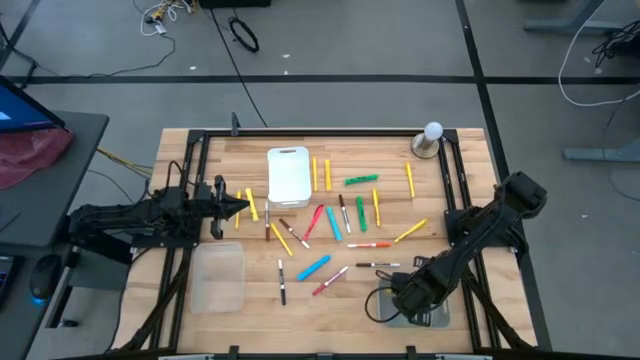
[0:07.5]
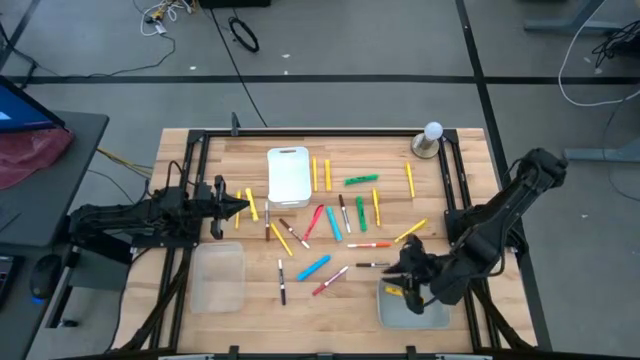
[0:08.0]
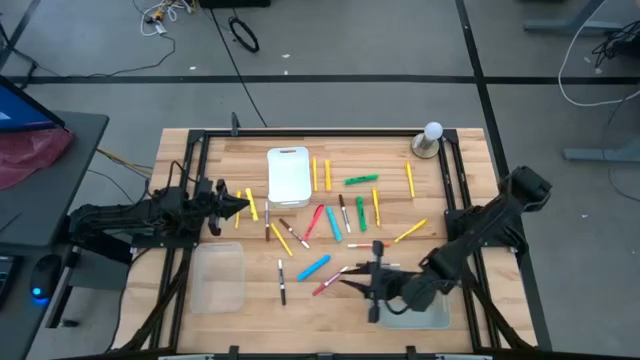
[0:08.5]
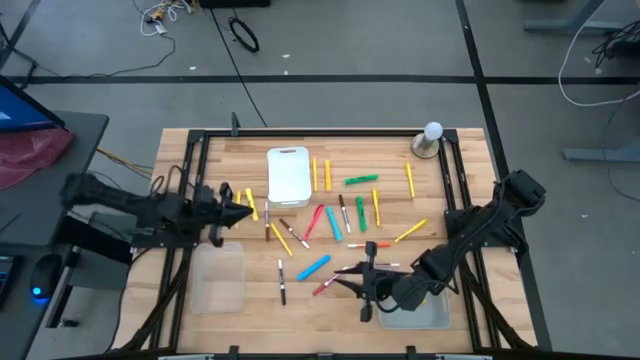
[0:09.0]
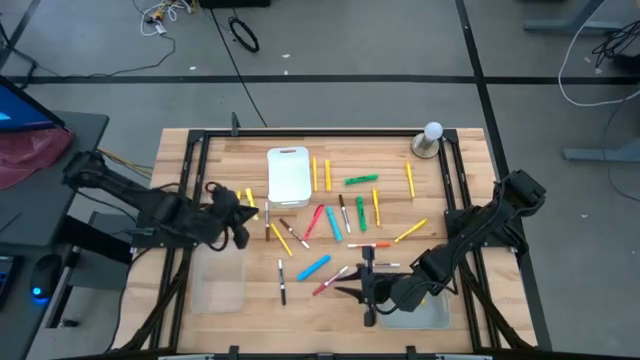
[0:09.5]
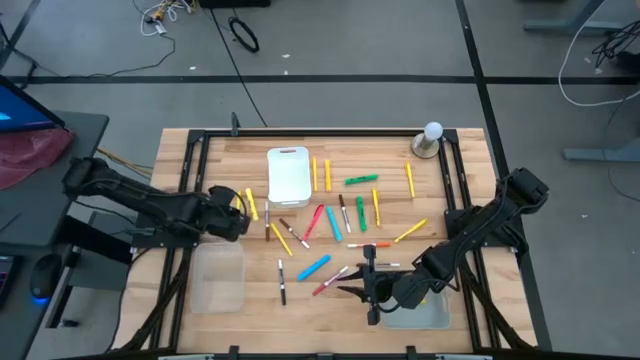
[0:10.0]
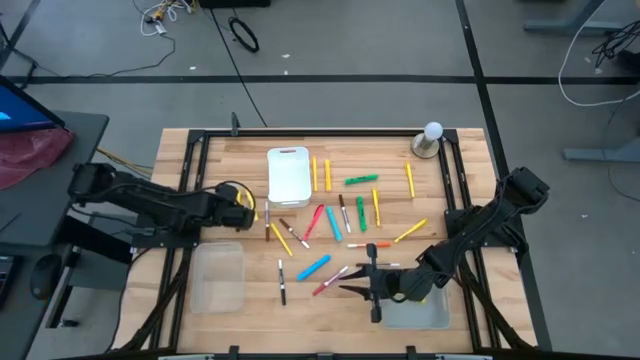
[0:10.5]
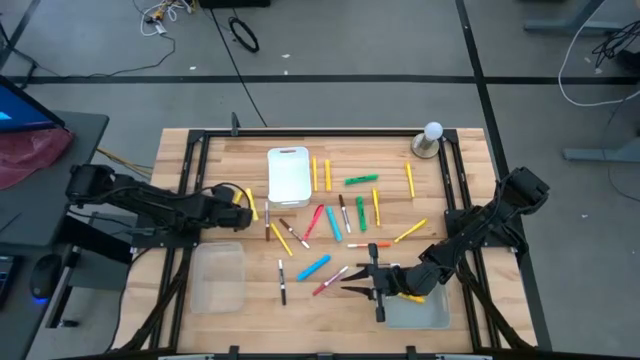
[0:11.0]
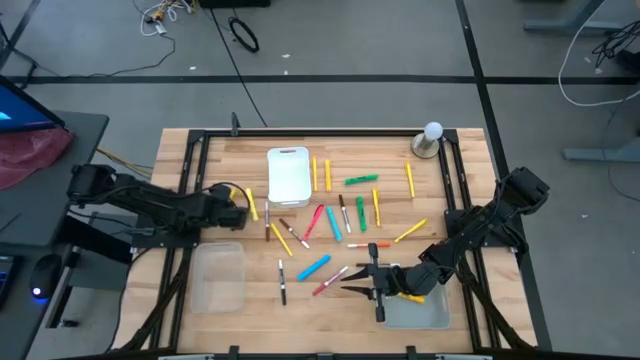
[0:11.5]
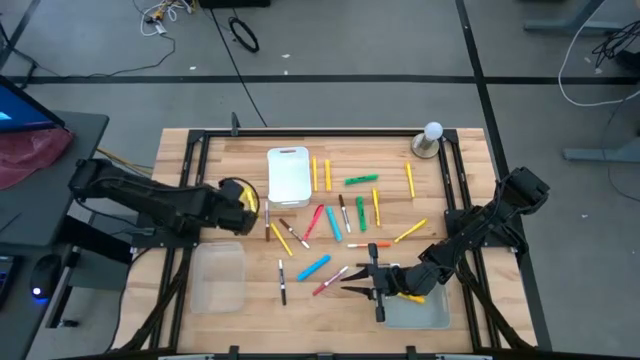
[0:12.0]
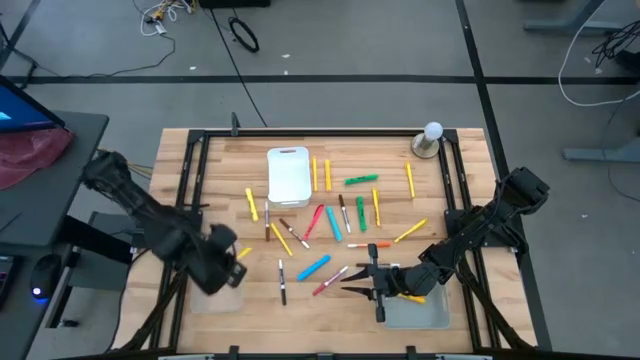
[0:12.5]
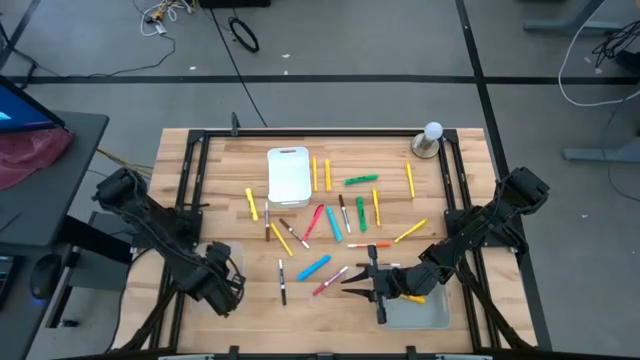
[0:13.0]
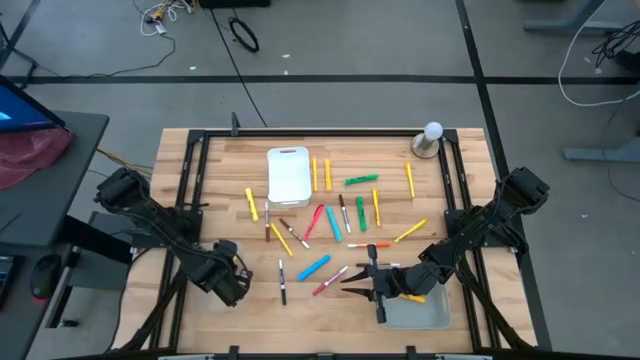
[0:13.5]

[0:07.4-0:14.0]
Task: Pick & Place Markers
Put the yellow pen into the transparent bin

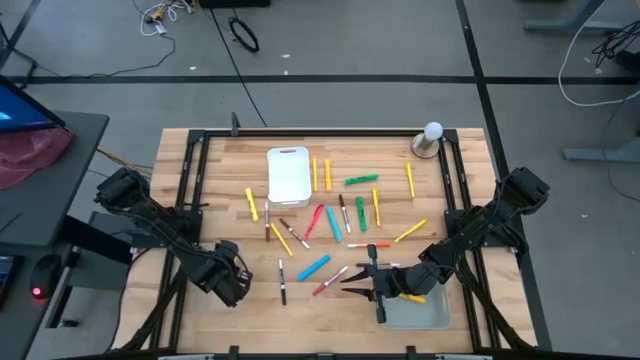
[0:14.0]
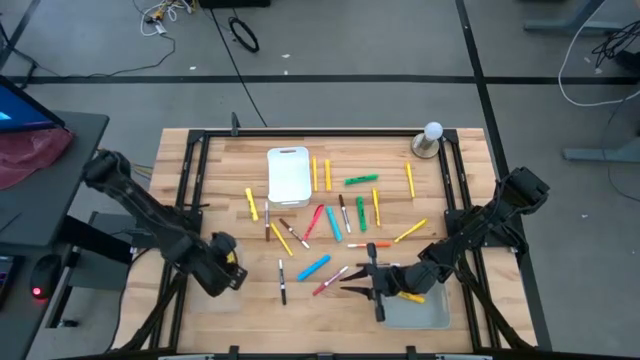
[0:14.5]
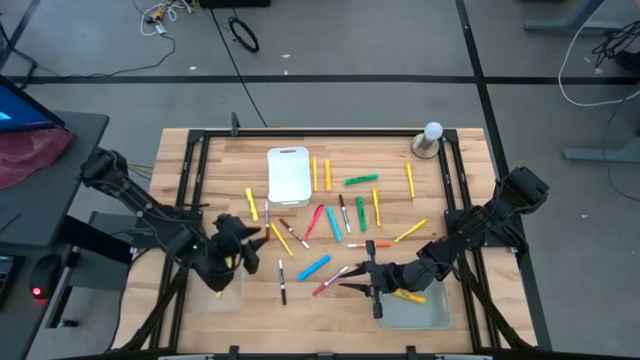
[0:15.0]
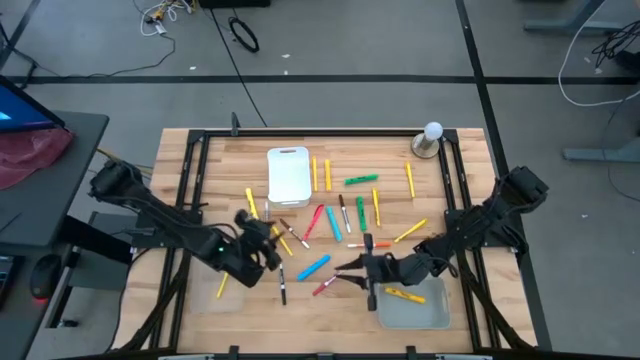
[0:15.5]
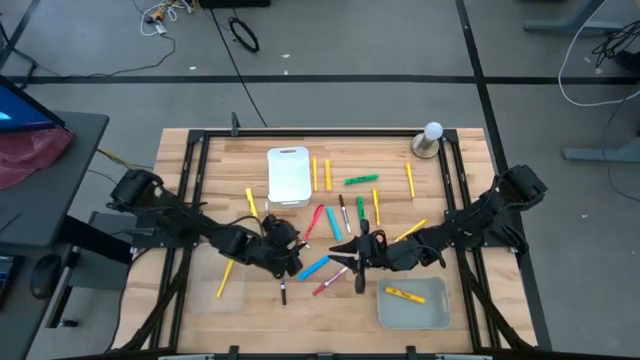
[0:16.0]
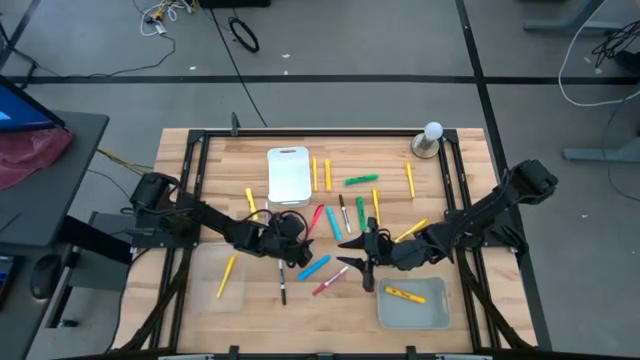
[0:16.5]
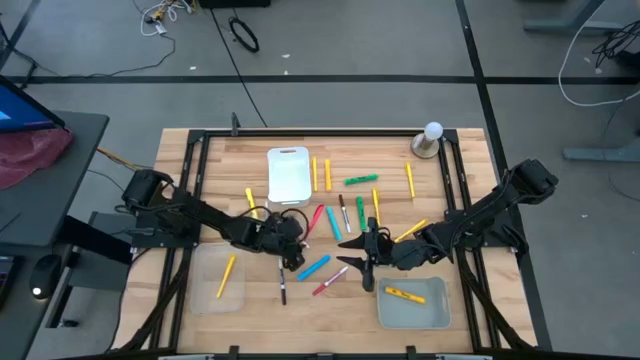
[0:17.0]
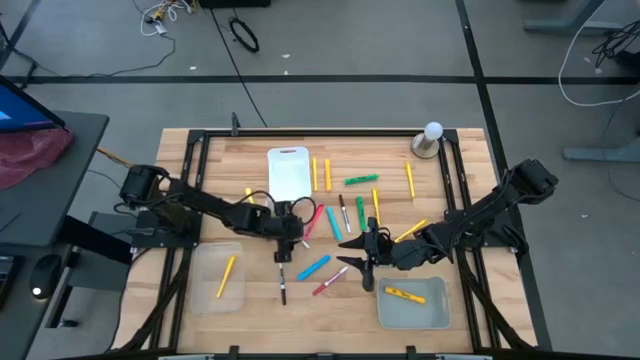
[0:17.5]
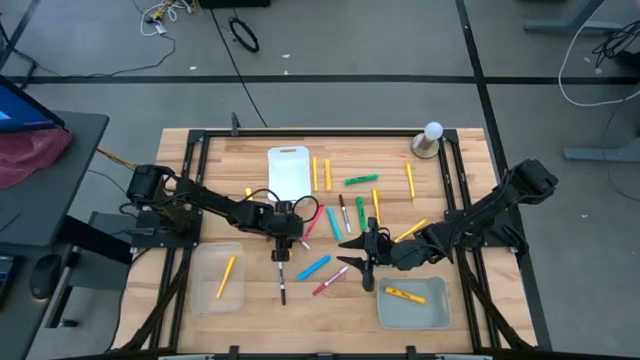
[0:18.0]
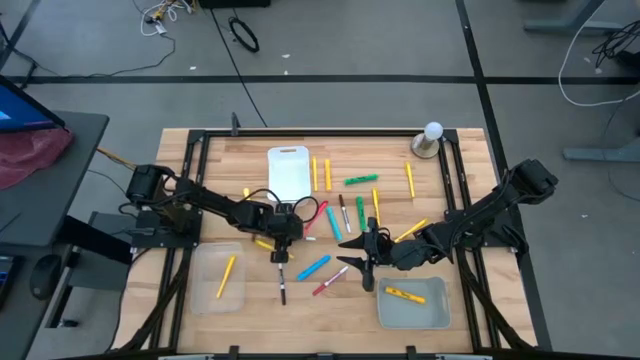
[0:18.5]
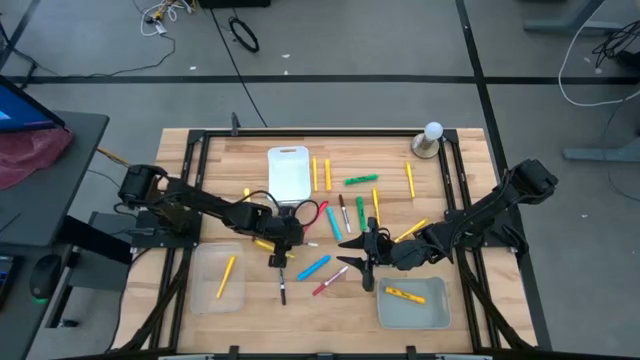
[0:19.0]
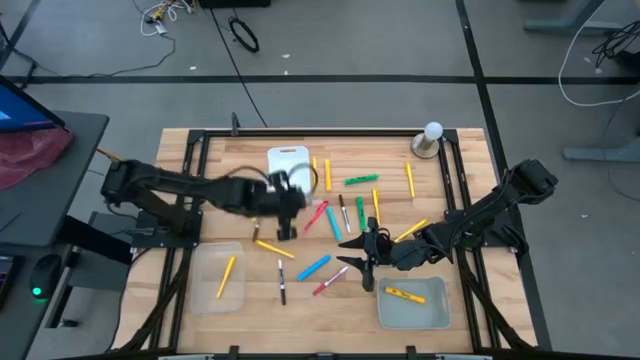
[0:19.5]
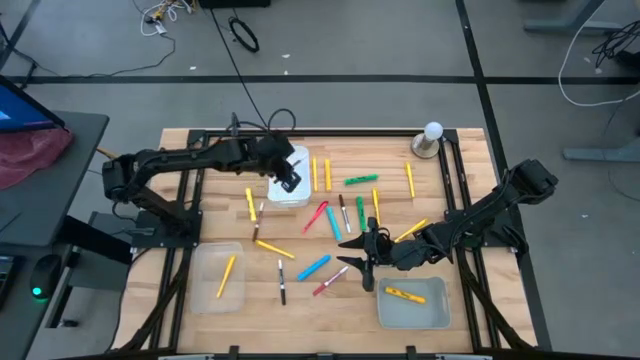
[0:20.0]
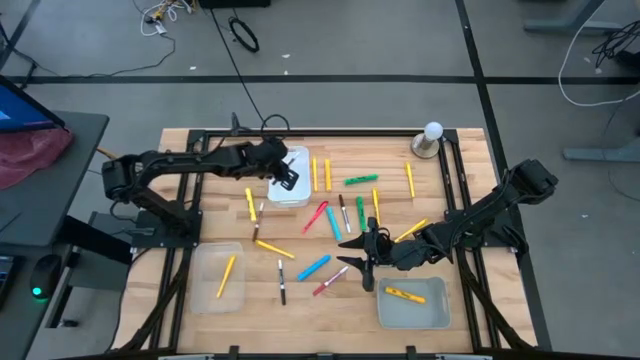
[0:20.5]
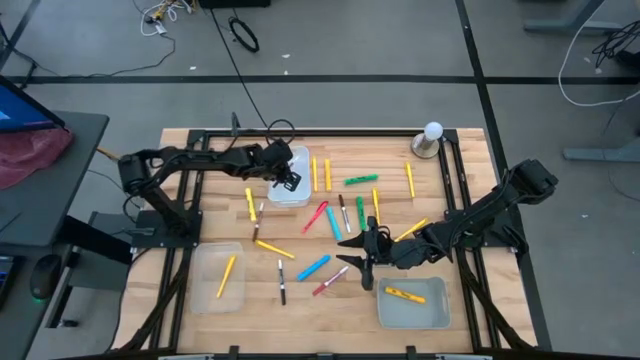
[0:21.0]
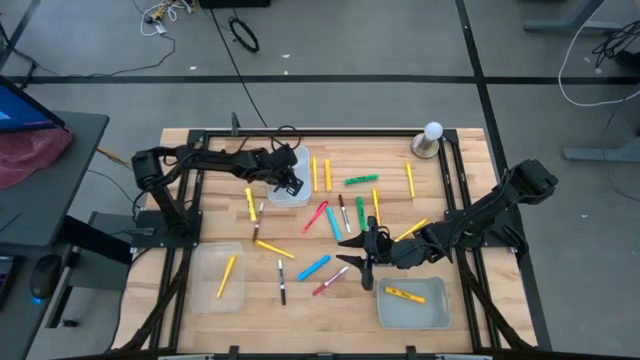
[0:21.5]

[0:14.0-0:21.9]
Put the brown marker pen into the white bin

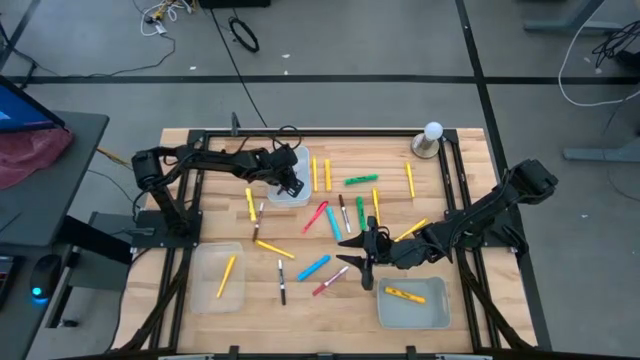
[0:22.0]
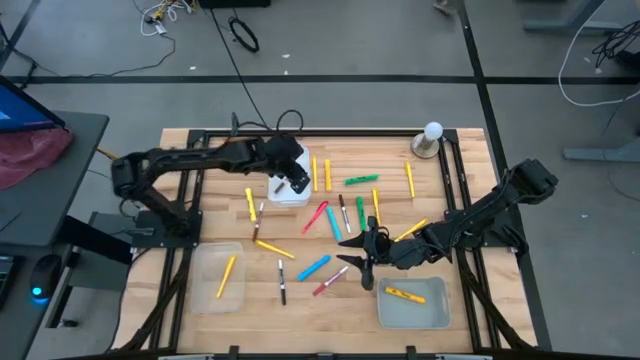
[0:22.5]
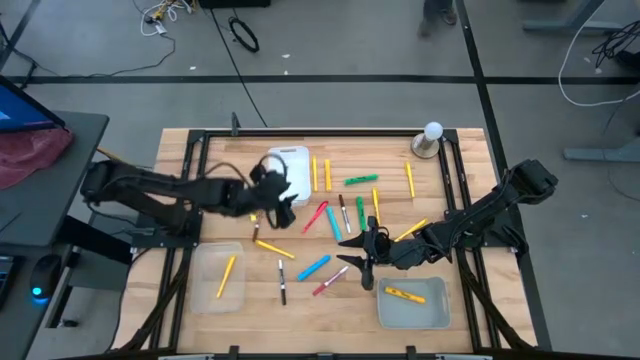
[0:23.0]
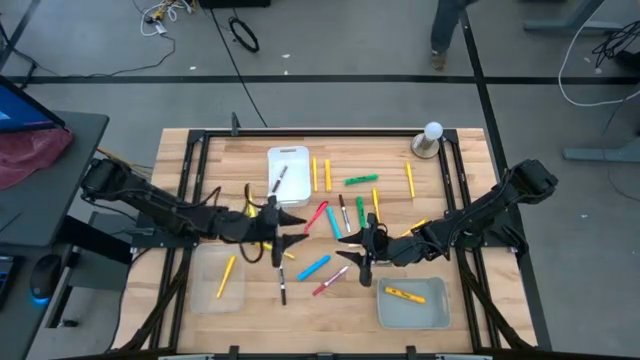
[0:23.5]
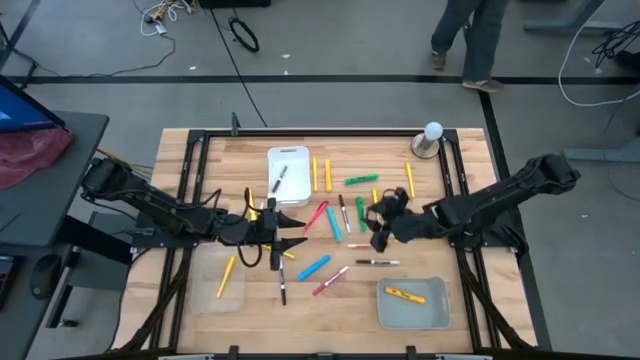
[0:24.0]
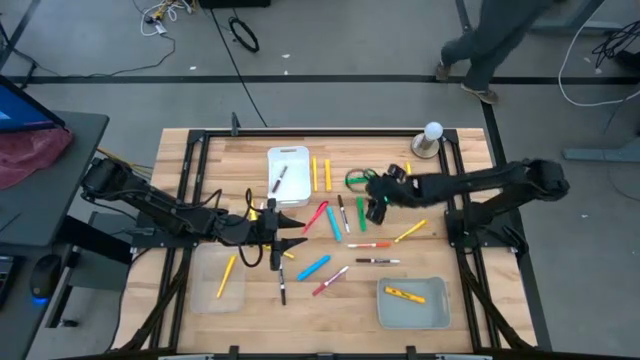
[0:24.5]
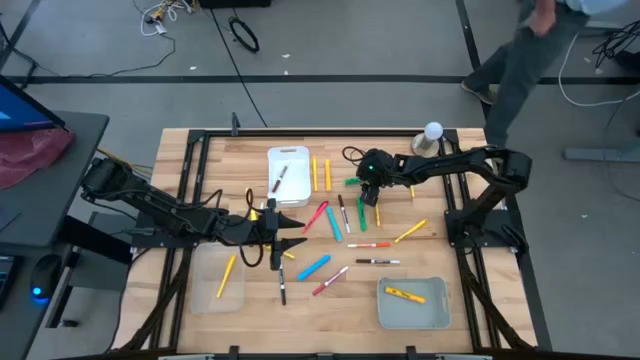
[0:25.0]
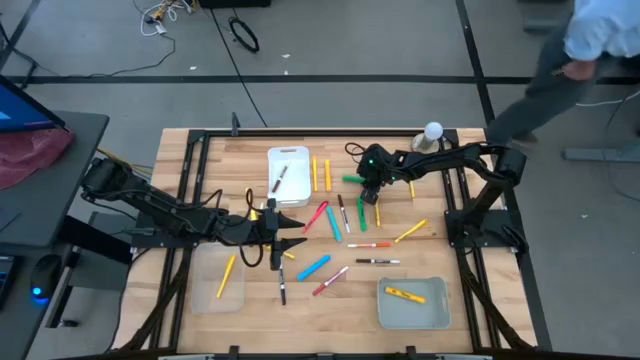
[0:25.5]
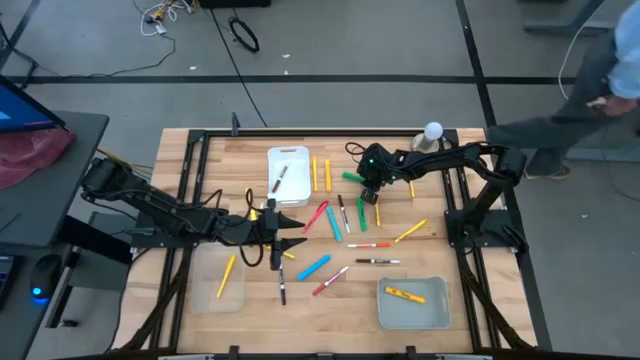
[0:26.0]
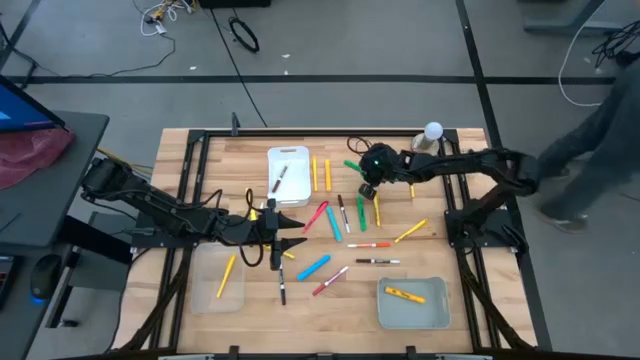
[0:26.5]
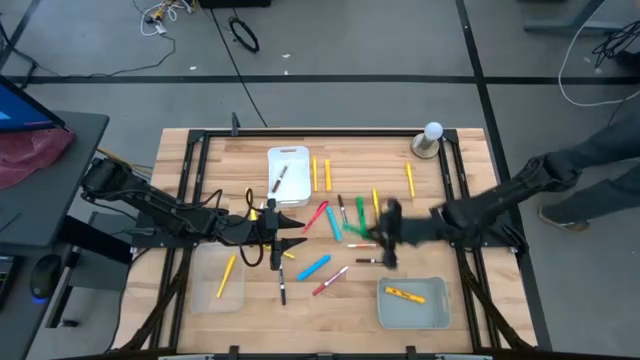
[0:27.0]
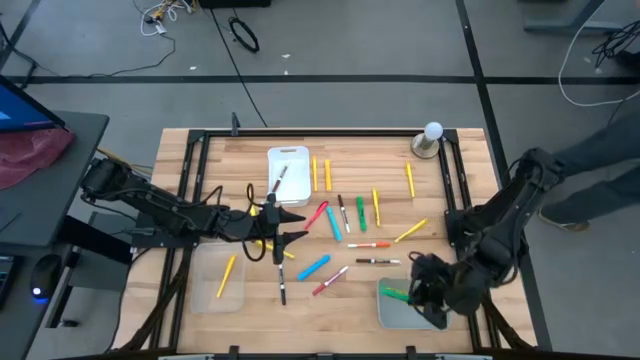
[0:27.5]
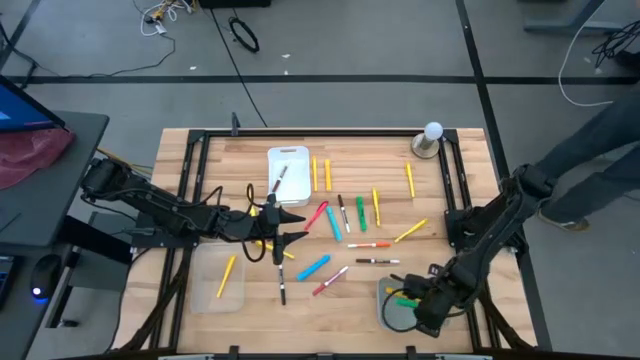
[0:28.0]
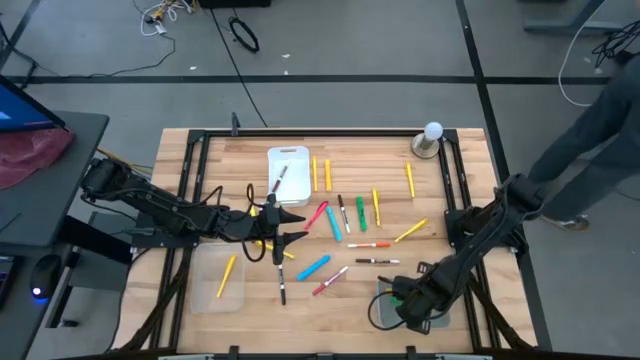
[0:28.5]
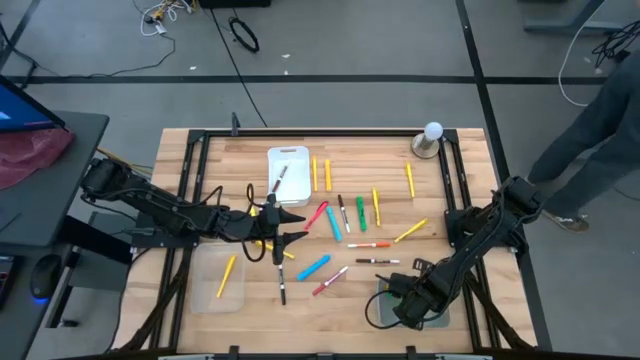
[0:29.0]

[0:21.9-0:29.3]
Put the green highlighter pen into the gray bin
